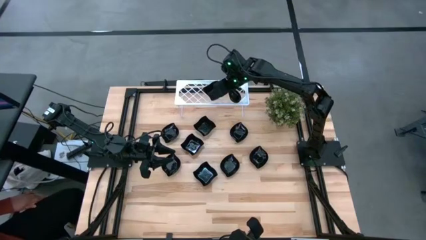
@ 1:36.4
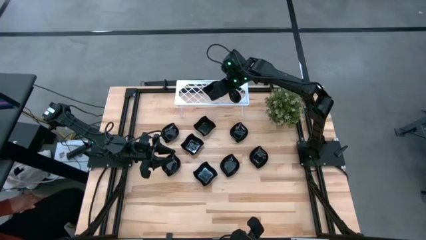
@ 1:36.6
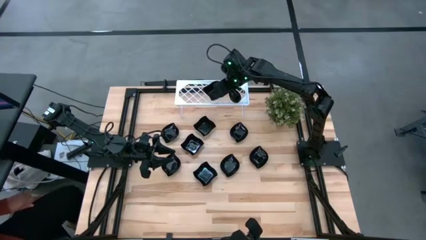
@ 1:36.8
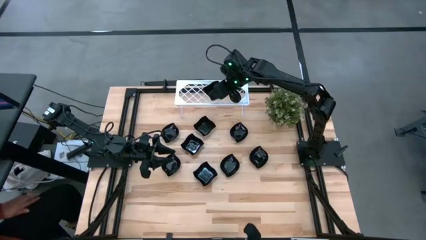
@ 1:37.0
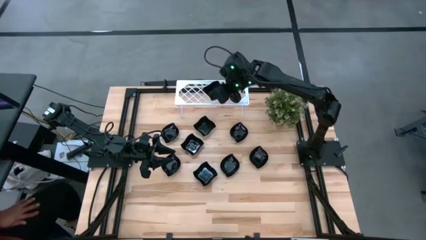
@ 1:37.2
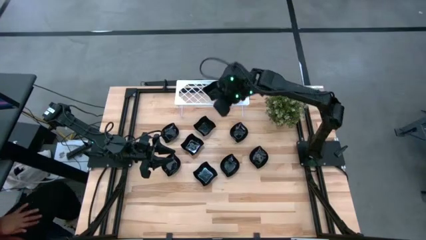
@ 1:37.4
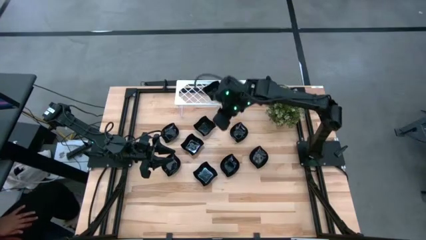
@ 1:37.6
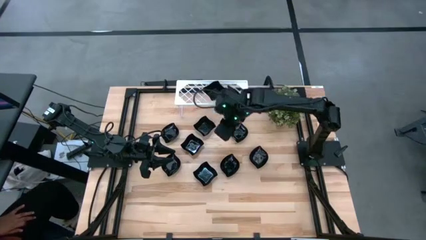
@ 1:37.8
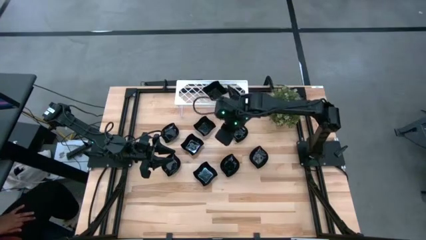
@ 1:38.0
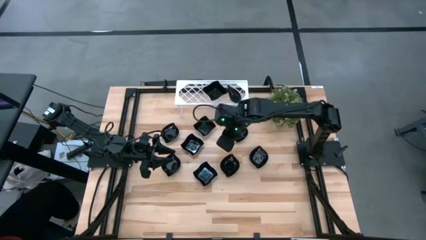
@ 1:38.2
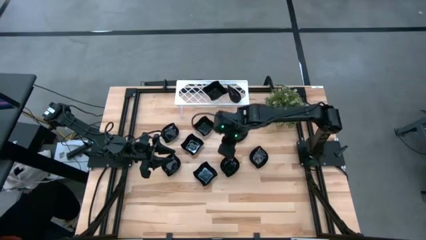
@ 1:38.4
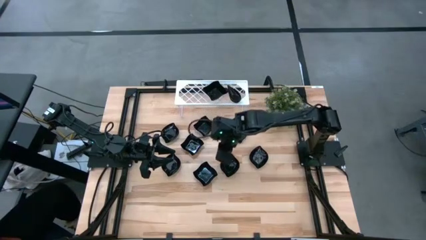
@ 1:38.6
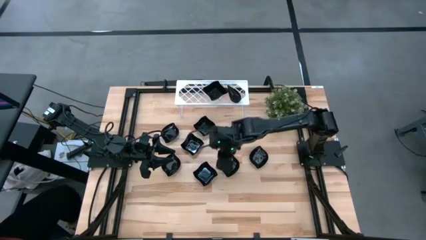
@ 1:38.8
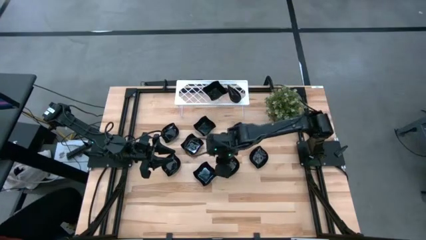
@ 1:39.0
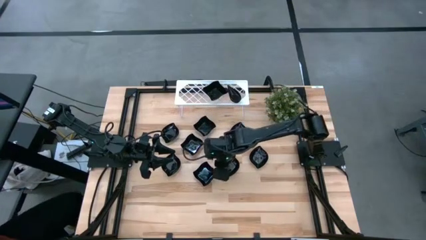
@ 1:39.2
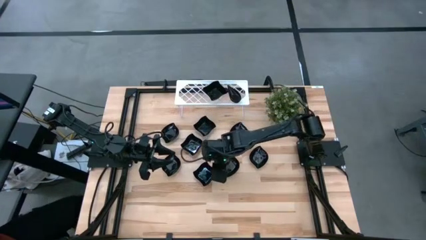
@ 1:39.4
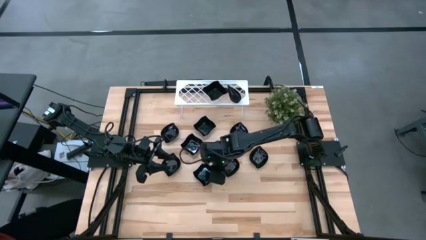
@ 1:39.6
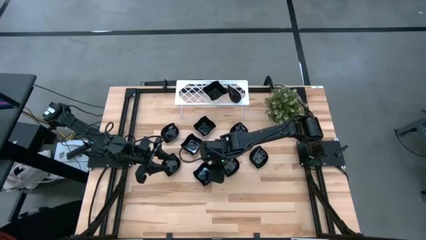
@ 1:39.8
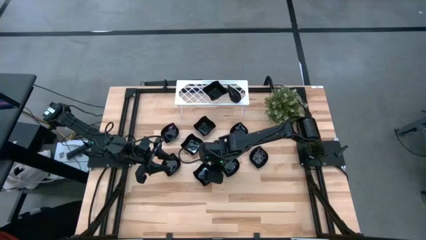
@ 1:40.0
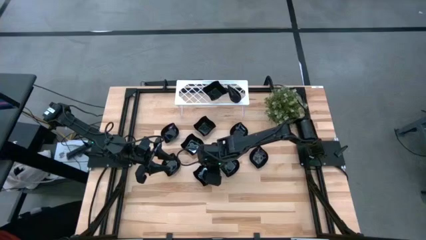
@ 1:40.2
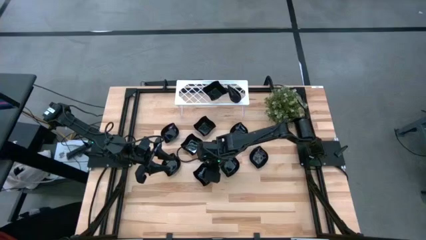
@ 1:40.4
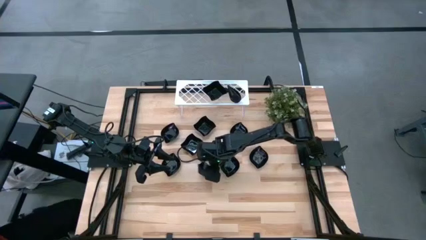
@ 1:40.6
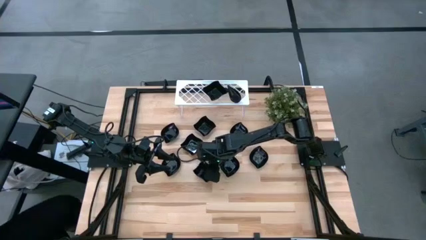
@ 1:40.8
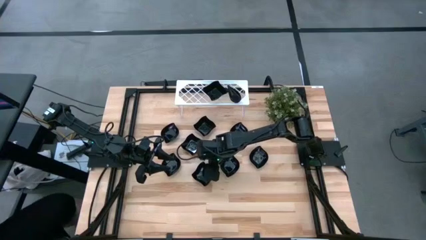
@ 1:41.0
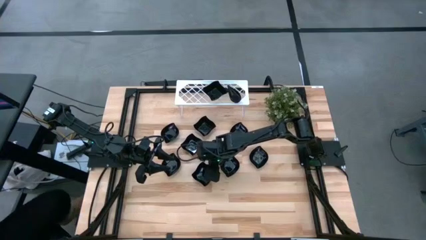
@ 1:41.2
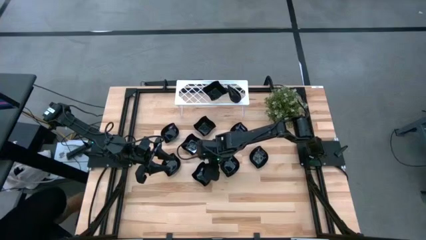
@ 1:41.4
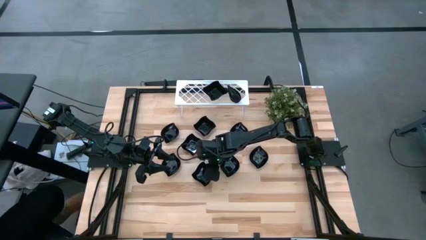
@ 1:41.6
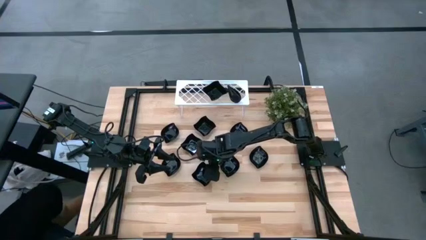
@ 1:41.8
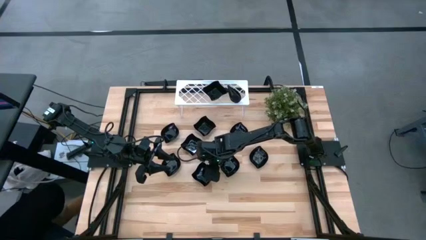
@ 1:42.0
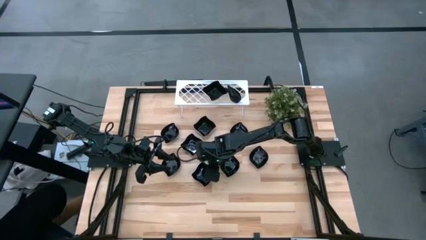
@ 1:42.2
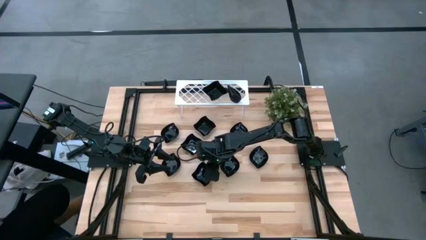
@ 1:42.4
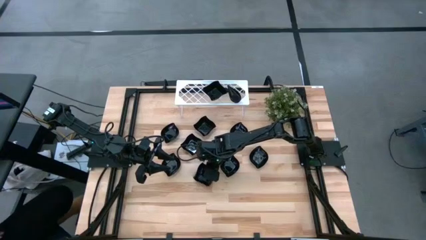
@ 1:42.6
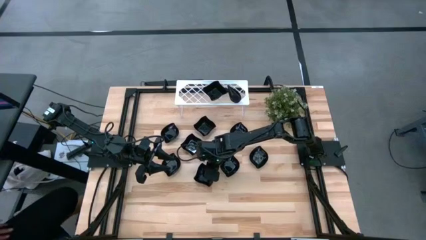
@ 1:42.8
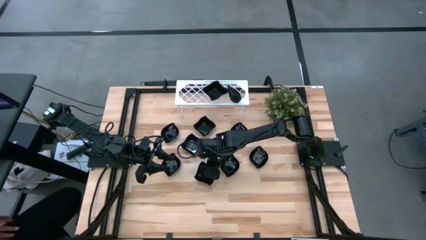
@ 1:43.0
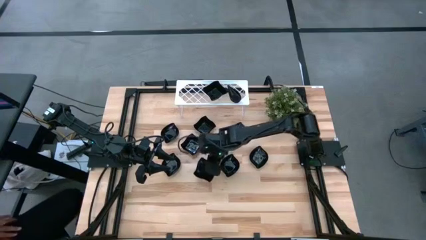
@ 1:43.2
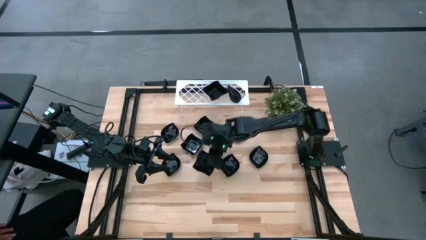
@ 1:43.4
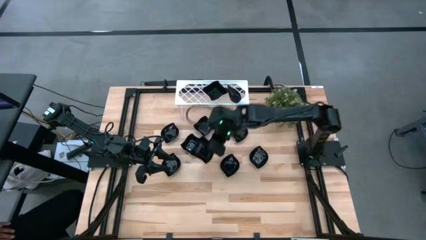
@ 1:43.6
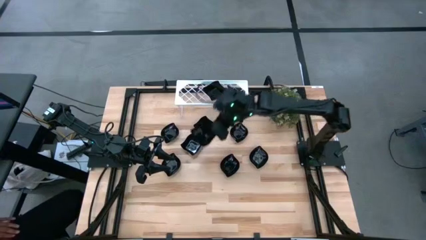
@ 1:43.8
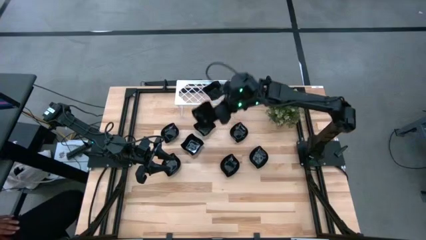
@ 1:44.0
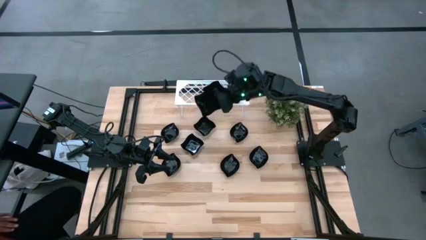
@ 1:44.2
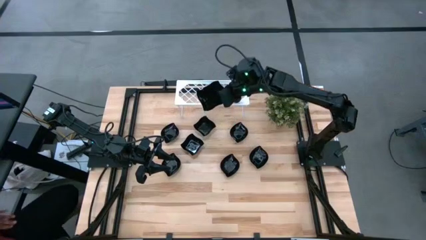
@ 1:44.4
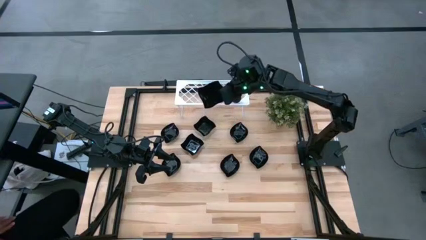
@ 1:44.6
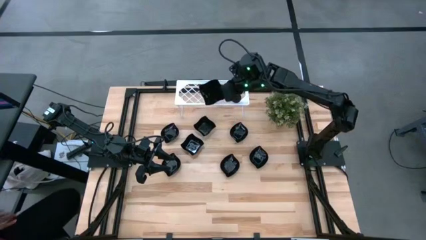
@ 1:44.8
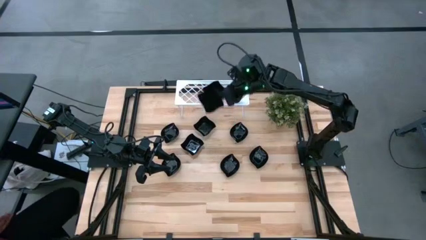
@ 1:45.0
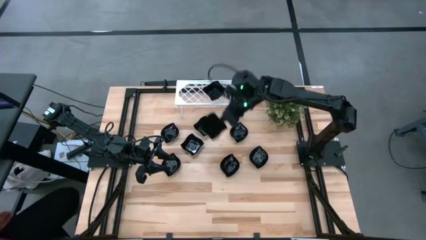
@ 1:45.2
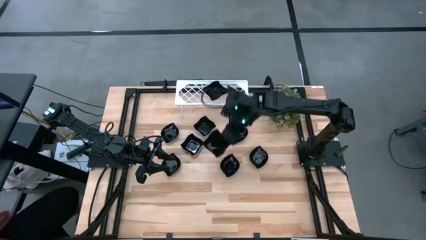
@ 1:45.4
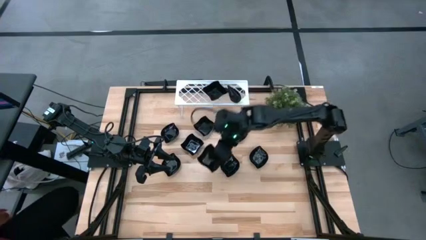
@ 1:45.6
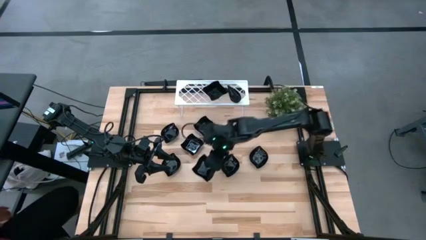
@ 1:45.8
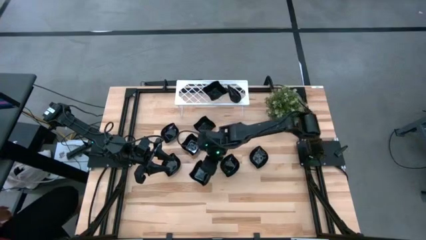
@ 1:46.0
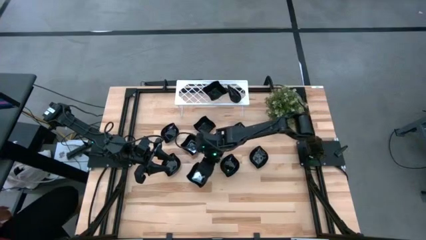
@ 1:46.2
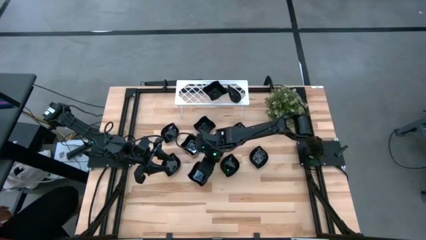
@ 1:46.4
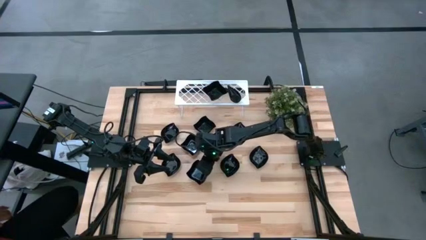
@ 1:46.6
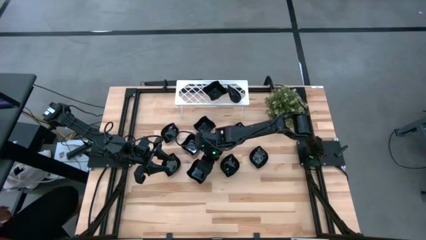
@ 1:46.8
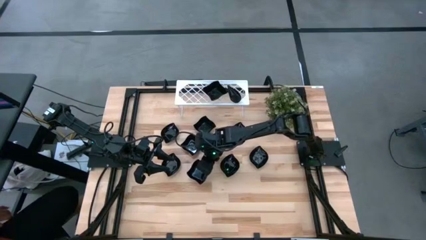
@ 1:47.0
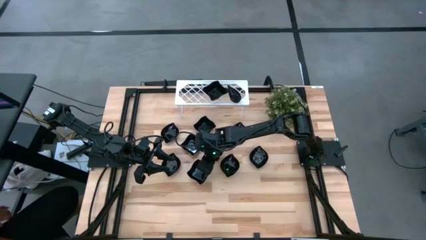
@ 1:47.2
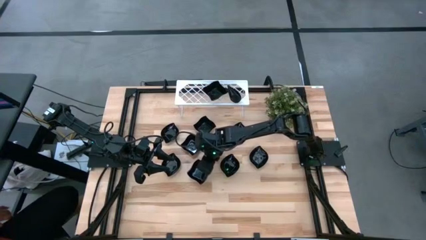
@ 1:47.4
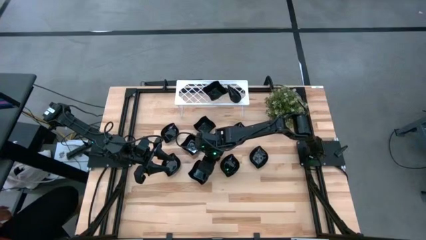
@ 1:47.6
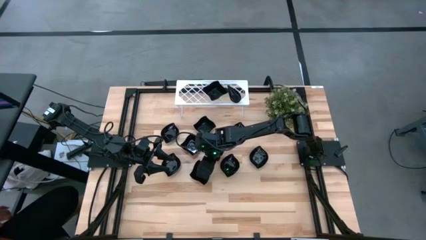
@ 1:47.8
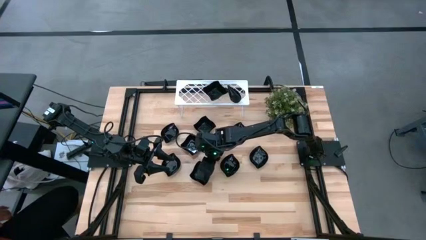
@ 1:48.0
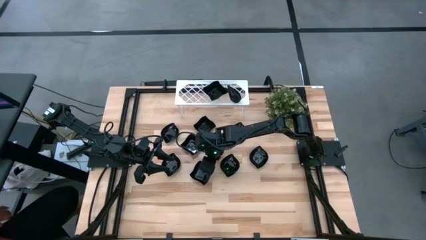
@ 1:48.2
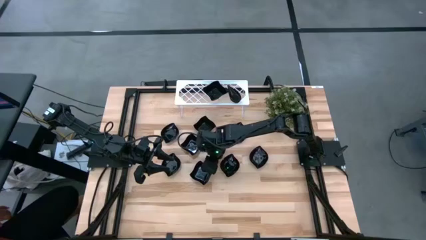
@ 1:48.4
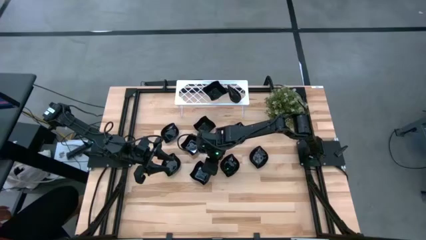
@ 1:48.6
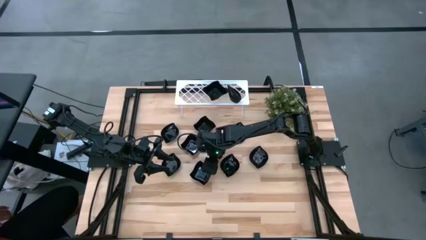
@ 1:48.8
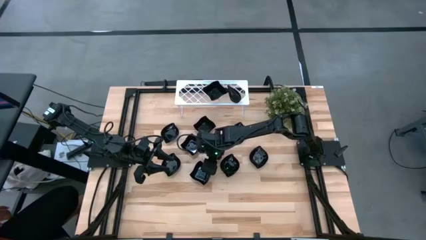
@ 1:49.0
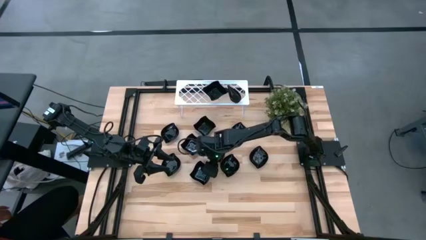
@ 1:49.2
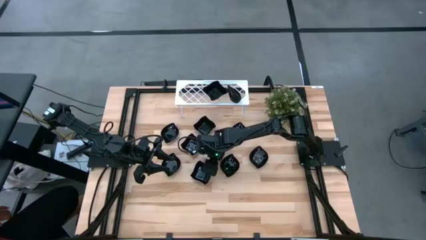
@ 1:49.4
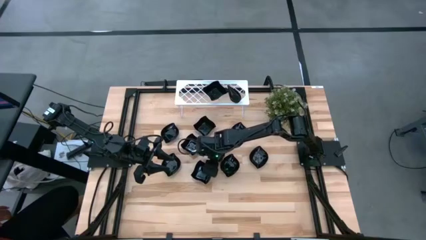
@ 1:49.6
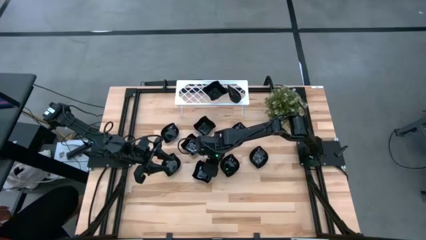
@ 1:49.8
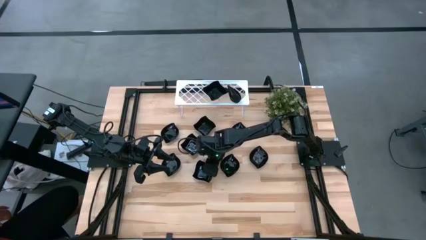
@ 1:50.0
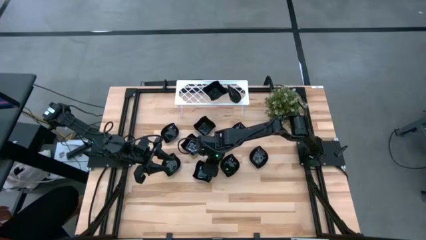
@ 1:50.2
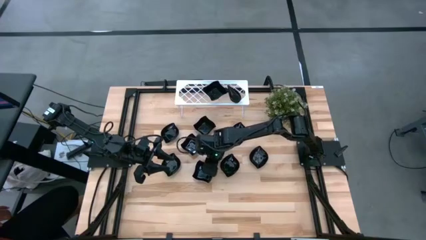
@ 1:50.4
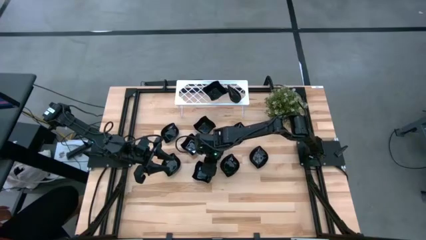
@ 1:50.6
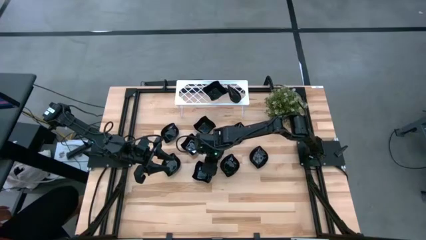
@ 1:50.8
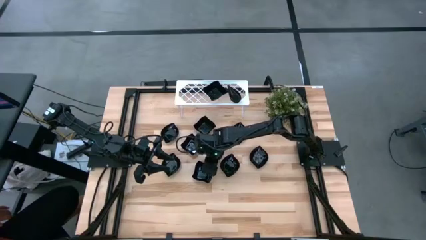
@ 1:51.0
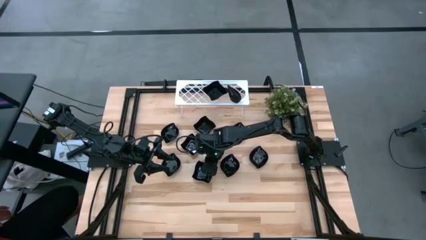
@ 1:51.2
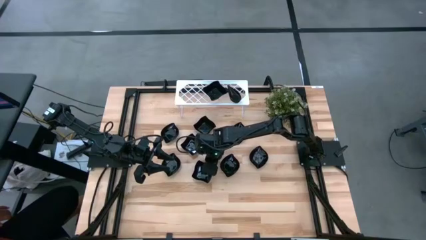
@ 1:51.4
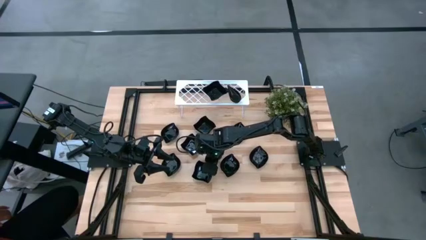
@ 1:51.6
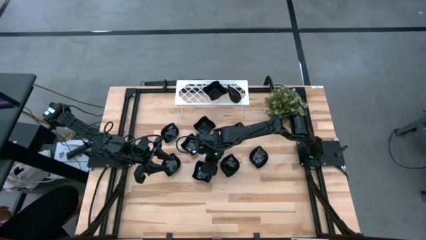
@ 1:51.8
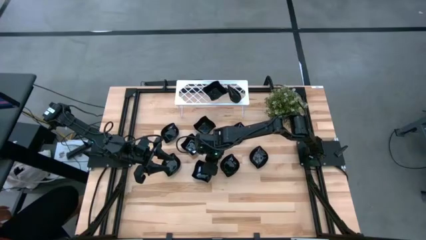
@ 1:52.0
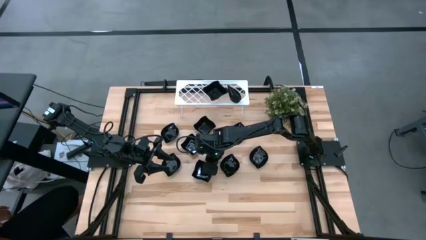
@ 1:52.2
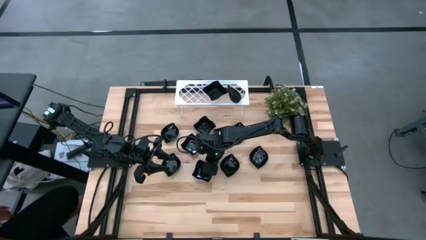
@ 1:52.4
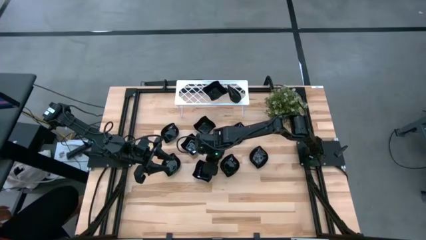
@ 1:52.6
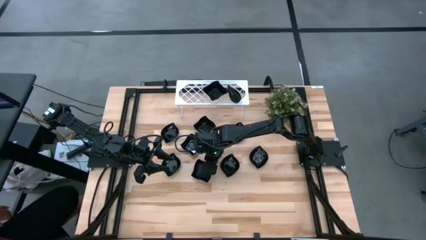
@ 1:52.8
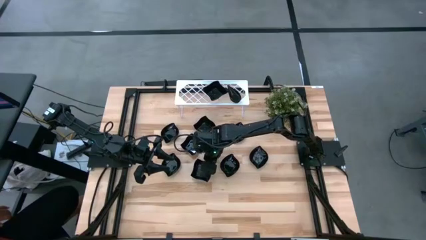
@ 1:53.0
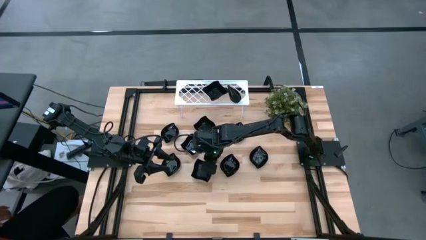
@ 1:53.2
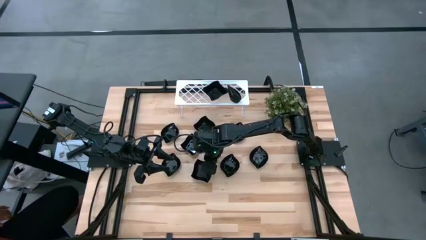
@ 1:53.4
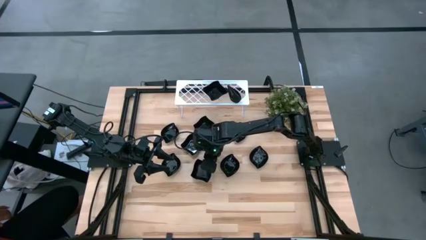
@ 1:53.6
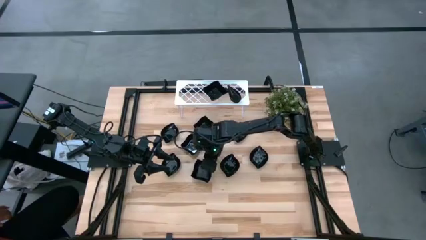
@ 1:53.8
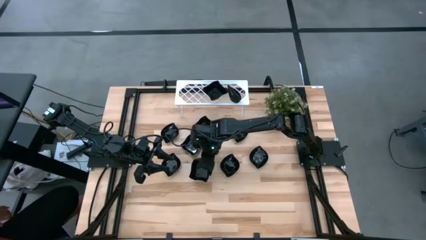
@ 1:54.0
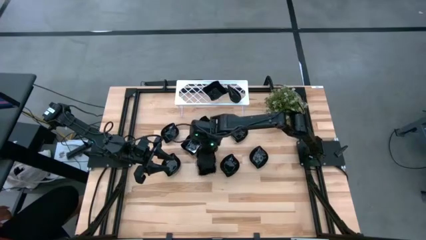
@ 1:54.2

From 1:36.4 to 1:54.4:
Task: Pick & Place Mini shaped plates
Stack the distorted square plate on top of the other distorted square plate on the shelf
